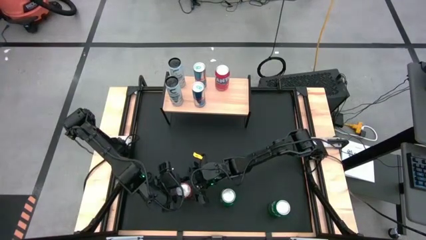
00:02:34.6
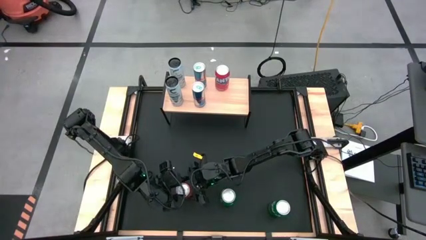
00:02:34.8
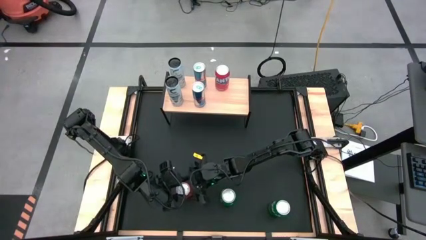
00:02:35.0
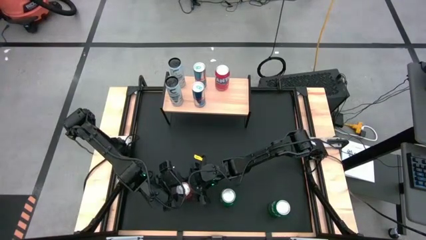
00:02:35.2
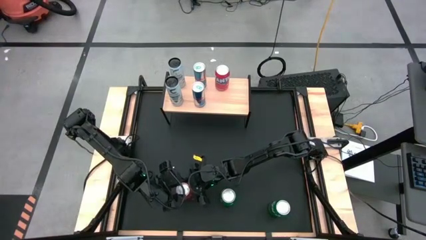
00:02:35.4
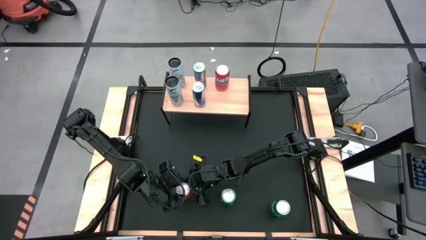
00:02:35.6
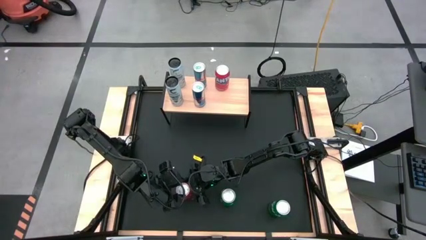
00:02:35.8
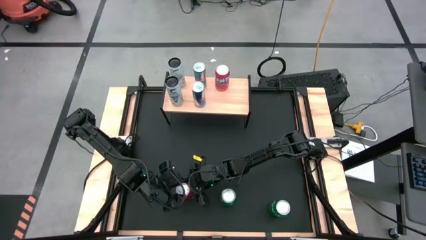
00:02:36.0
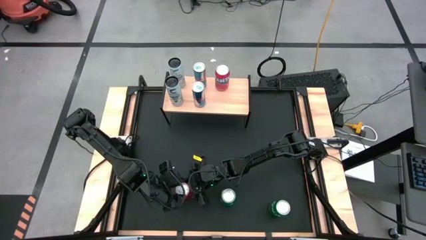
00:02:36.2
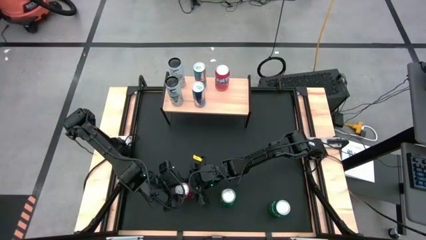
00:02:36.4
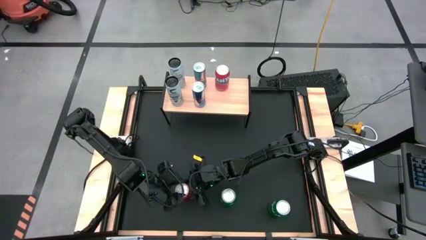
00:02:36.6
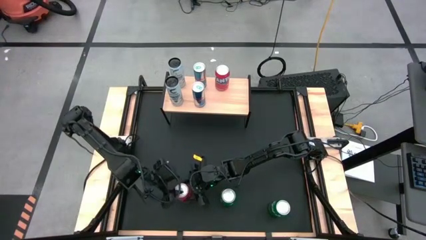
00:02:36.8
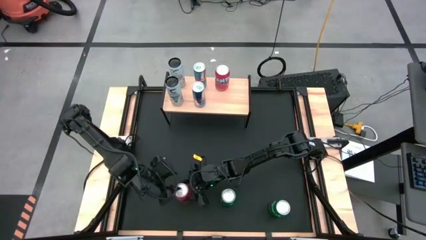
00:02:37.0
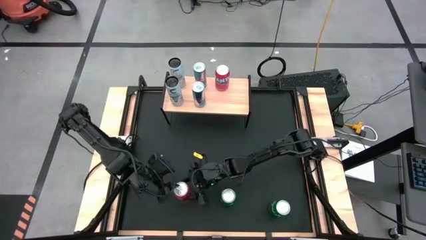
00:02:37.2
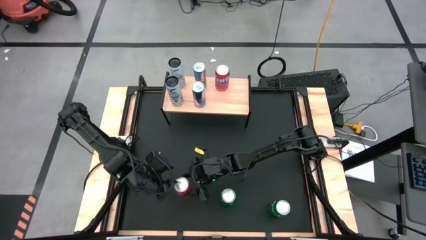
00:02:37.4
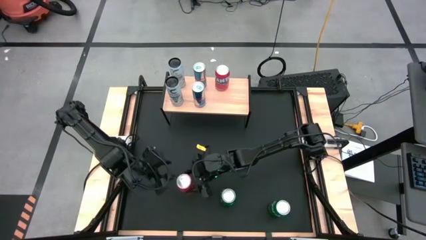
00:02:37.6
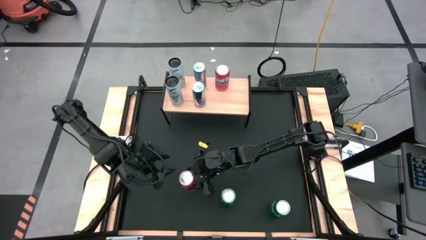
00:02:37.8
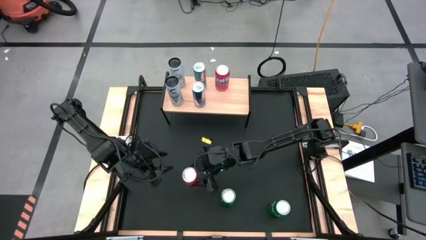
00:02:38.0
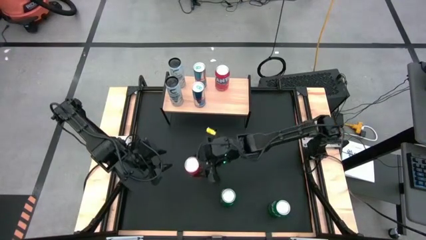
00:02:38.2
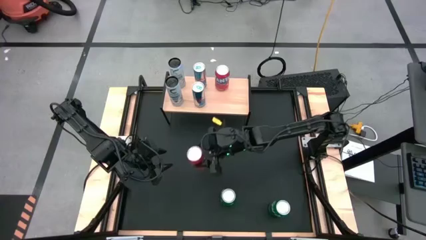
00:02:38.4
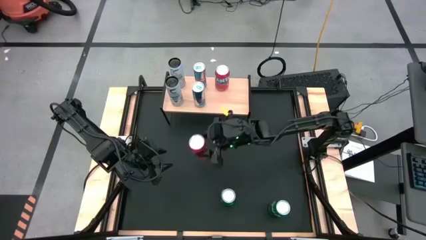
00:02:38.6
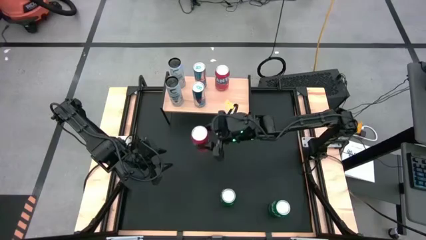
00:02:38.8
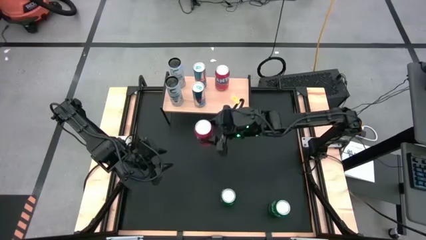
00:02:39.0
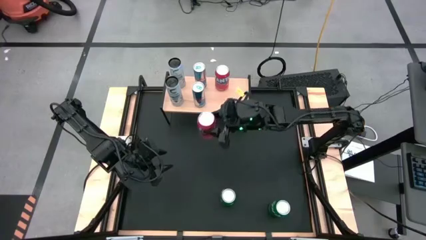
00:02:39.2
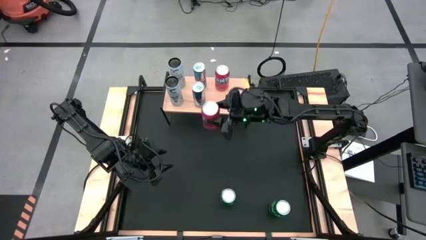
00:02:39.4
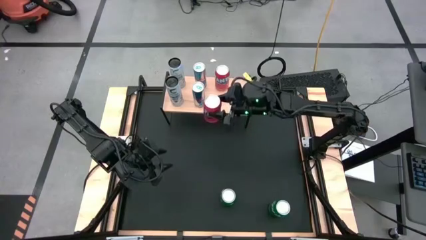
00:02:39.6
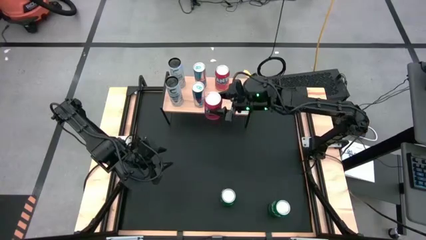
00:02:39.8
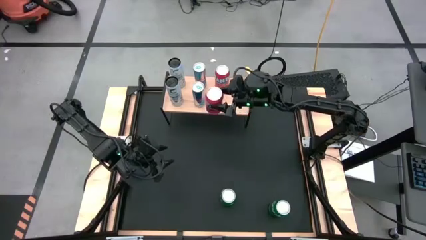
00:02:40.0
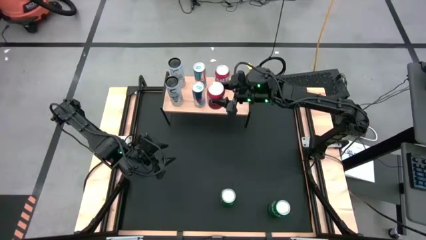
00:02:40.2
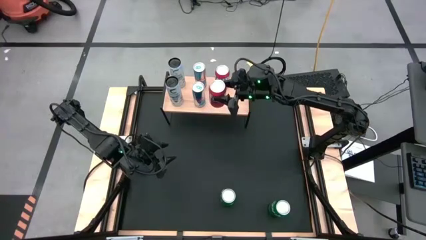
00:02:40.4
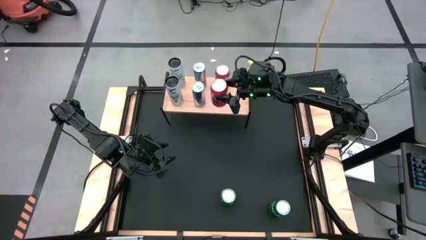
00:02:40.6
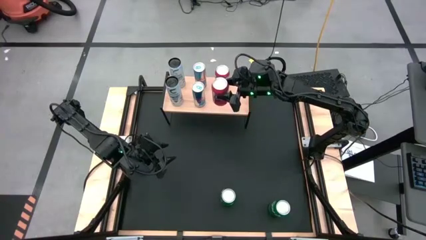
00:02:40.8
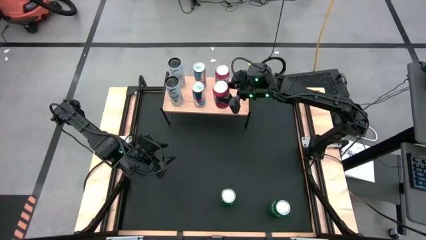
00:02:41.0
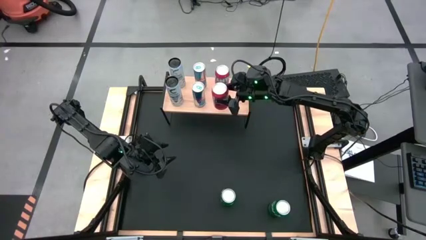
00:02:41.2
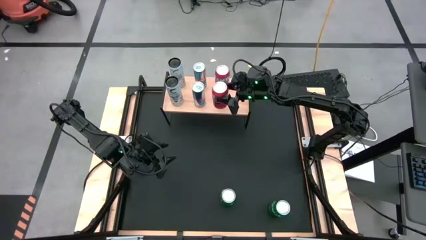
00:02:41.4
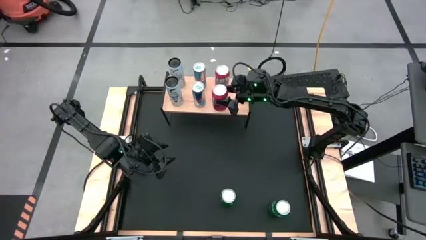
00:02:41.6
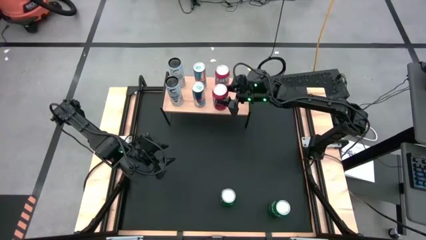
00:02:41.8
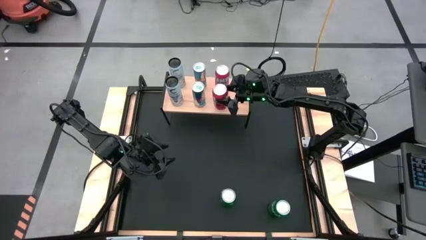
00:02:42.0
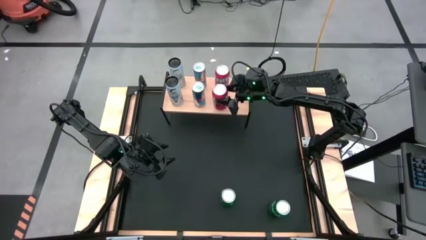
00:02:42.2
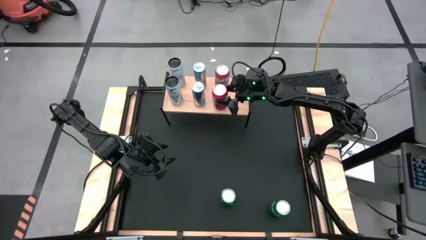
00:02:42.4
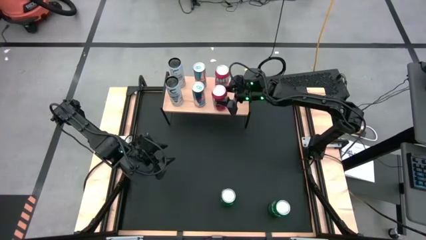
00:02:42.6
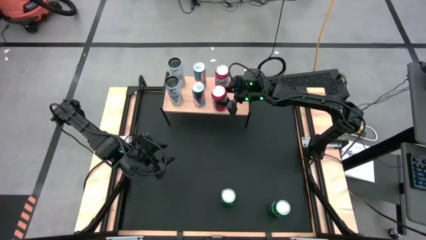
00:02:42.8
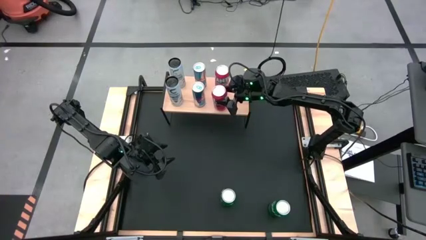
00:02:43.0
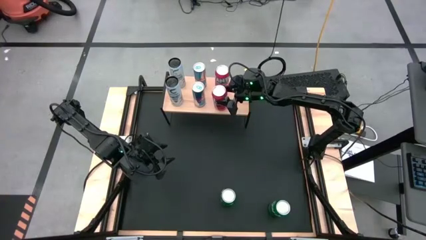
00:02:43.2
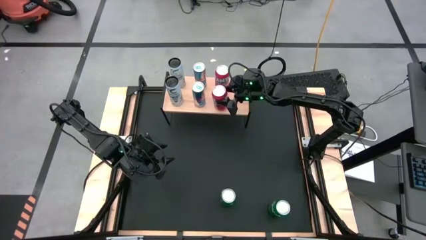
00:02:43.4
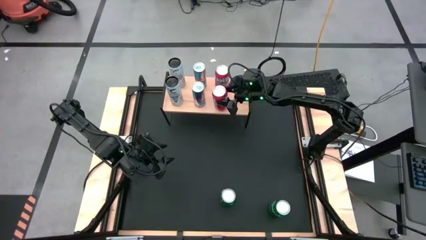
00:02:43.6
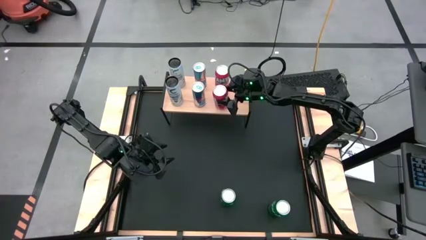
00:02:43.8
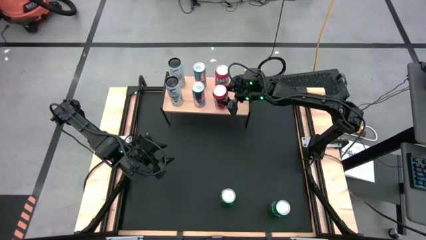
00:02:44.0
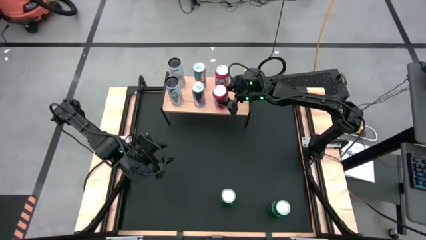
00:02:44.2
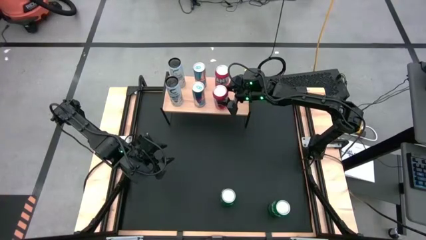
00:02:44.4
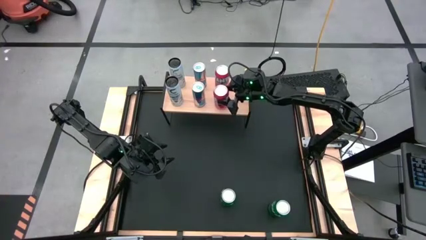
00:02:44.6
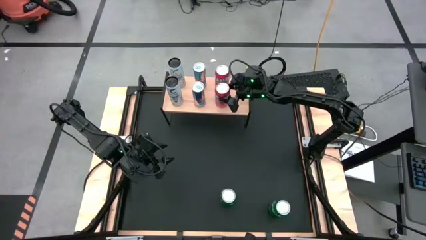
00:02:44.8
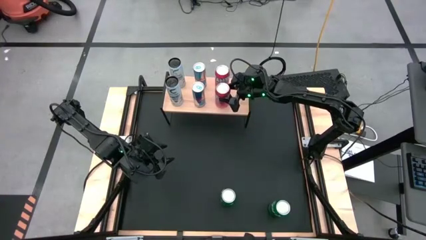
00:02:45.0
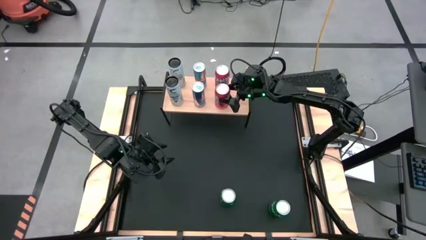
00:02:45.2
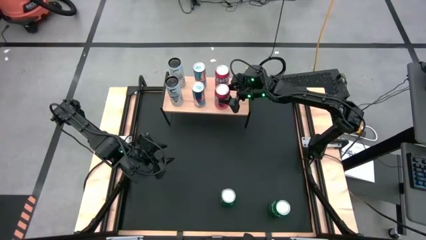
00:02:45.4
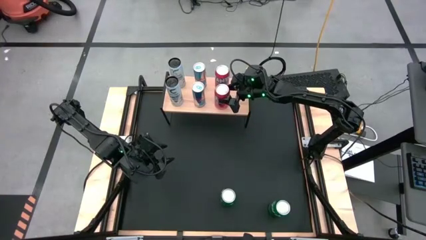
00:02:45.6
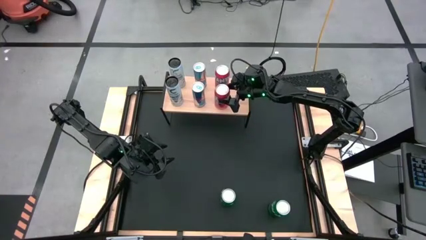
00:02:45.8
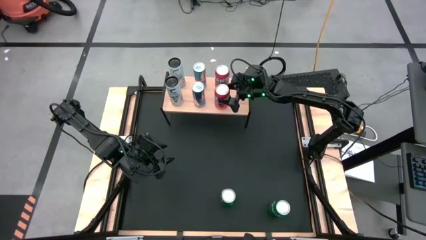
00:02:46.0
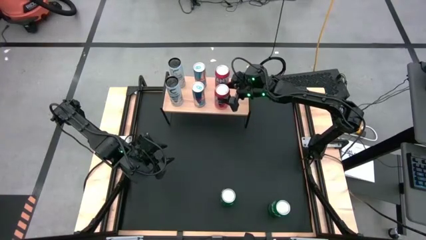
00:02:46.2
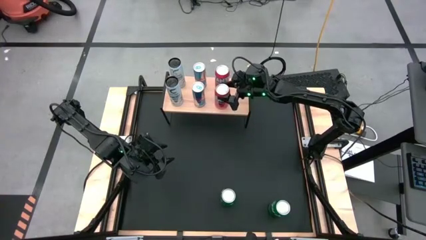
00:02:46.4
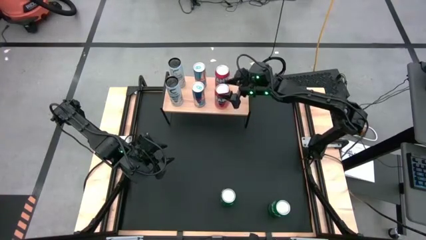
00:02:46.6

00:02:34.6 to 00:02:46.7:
Task: Place canned beverage on shelf
Put the orange soda can, aligned with the other orange soda can on the shelf

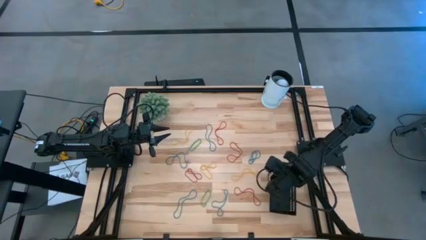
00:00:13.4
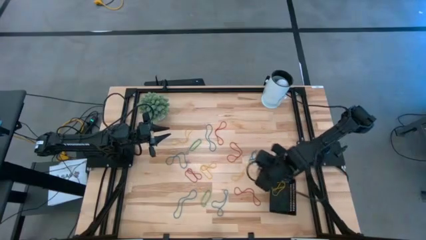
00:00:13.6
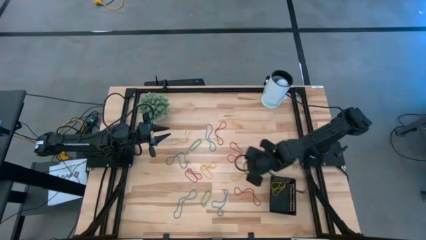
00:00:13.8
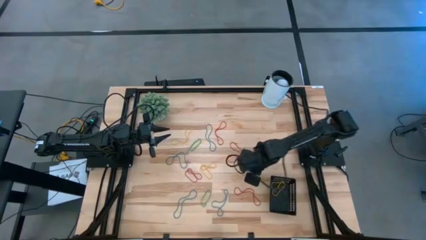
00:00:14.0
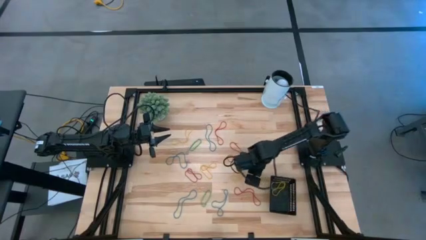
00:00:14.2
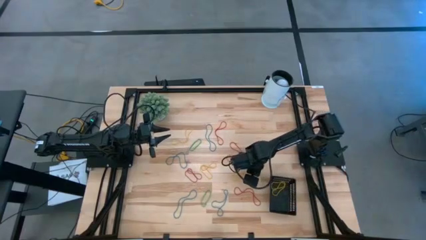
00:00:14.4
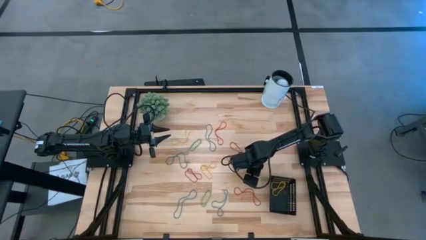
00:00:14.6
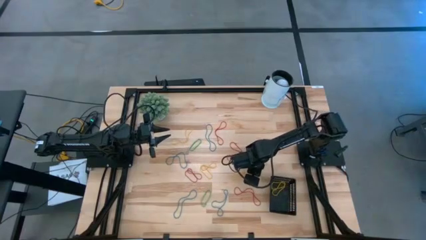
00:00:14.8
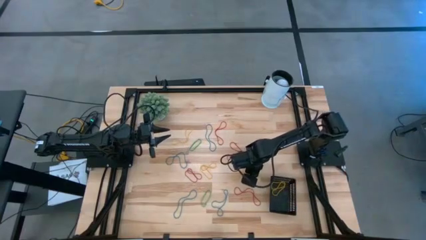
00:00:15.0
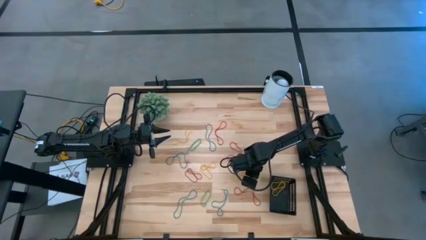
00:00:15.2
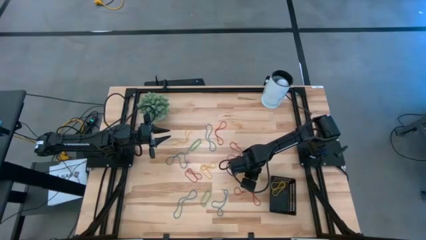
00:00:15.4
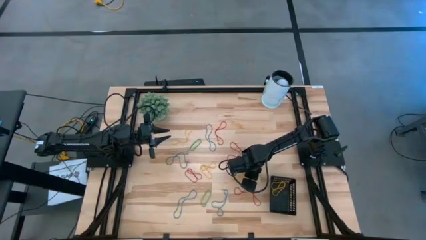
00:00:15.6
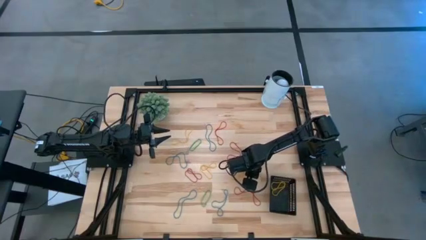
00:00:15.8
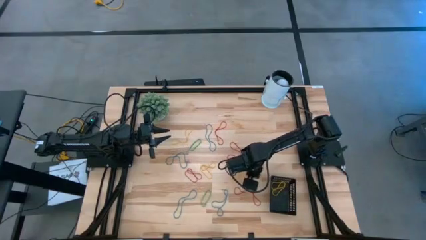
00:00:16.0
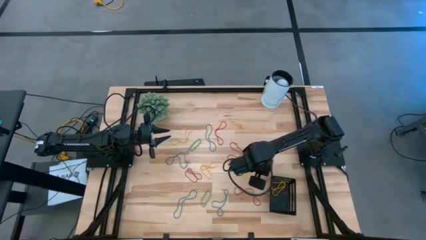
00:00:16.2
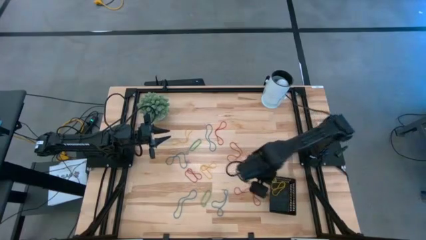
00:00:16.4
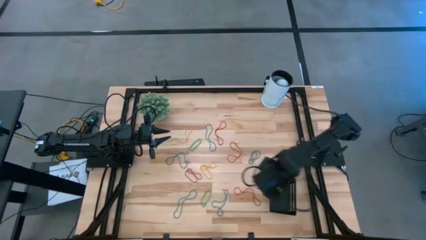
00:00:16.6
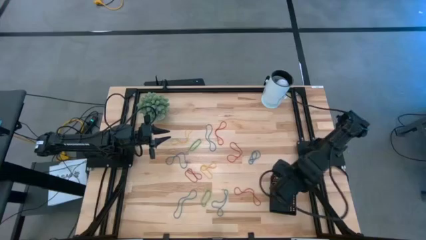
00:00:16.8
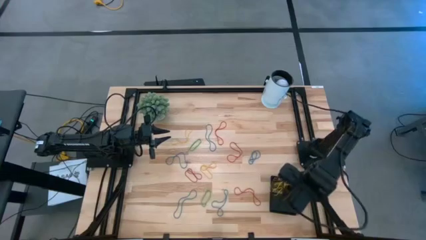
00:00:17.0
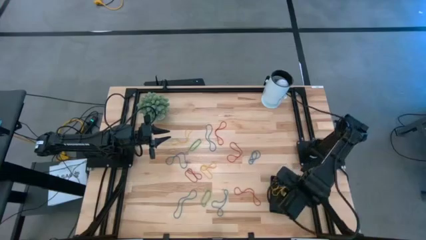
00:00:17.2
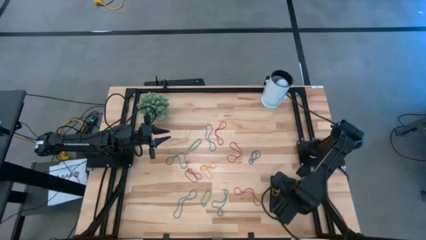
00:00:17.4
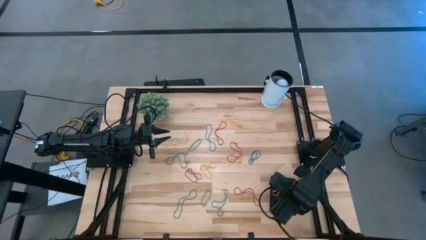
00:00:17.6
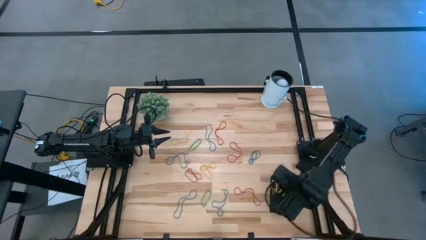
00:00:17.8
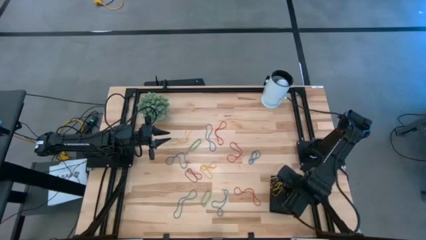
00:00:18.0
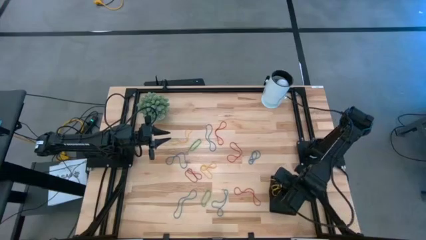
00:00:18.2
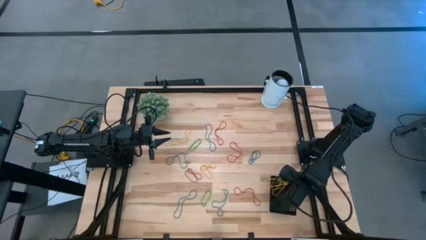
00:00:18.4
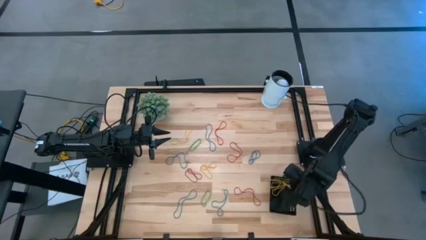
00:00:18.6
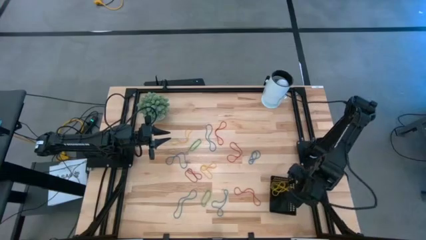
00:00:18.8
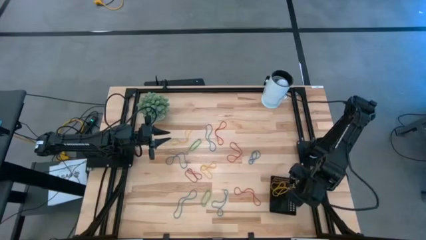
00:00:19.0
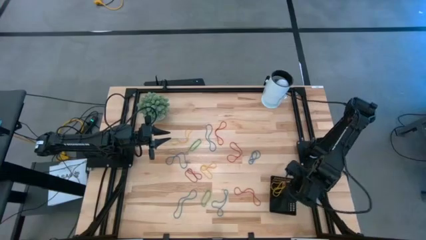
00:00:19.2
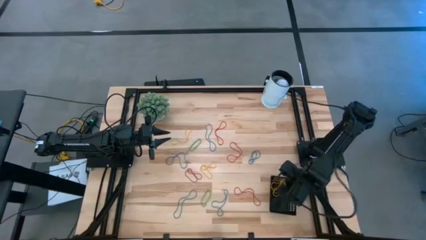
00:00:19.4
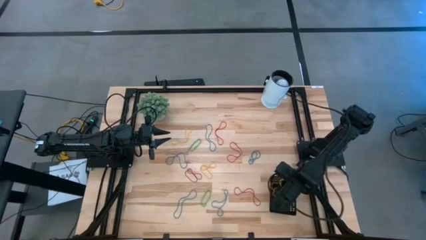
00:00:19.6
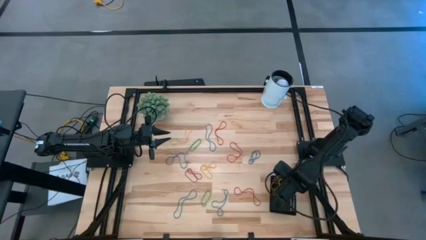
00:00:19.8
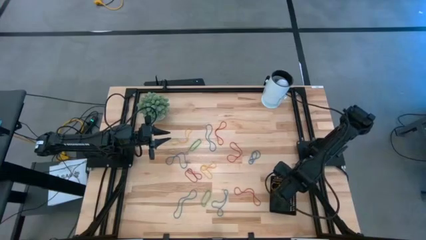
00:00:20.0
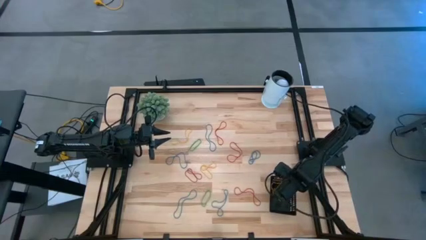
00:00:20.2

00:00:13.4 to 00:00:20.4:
Task: Pick and place items into bin
Put the bottom right yellow rubberband into the black basket
